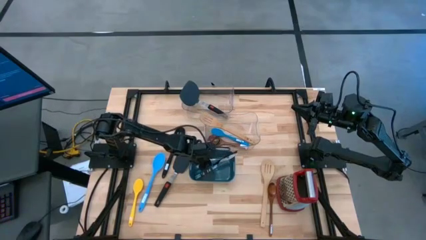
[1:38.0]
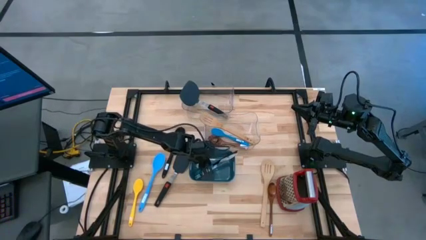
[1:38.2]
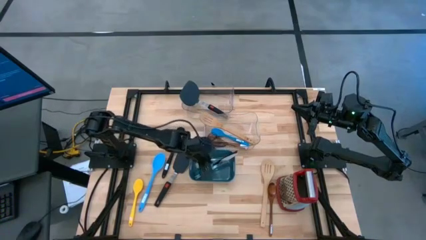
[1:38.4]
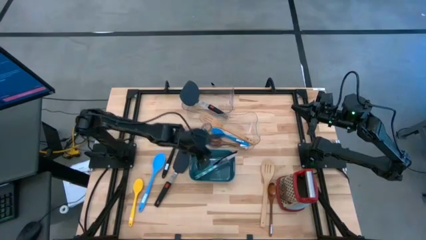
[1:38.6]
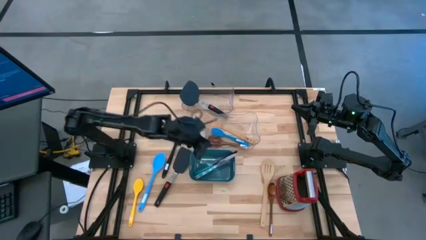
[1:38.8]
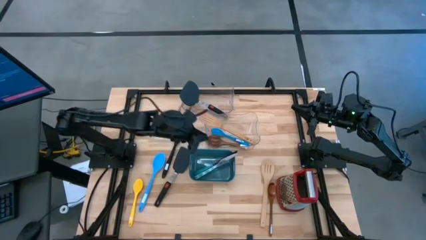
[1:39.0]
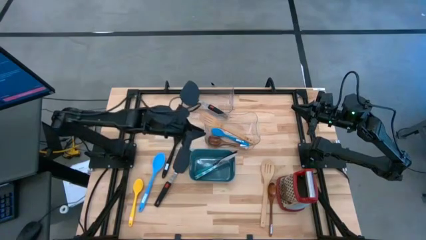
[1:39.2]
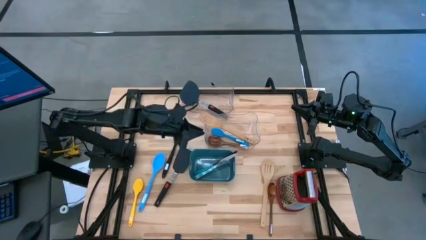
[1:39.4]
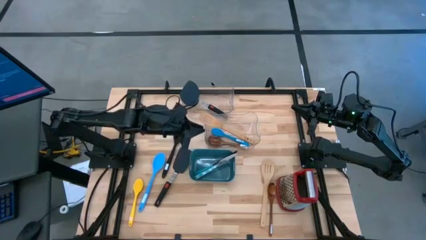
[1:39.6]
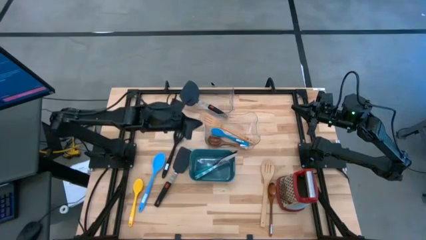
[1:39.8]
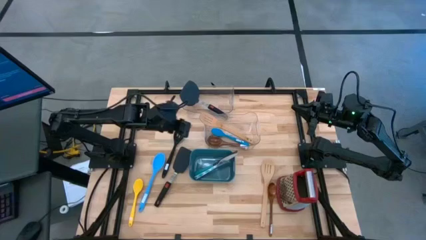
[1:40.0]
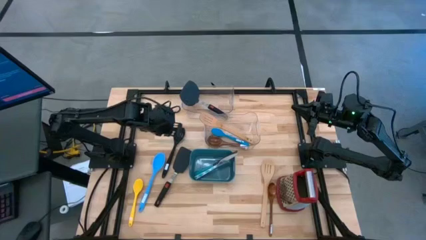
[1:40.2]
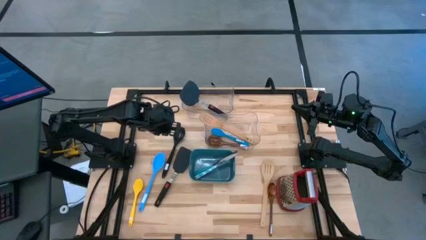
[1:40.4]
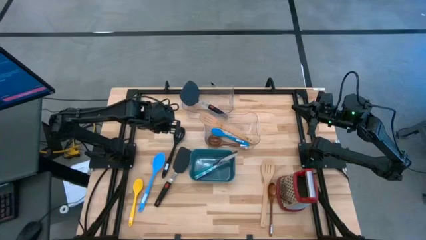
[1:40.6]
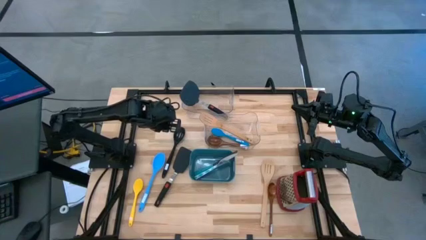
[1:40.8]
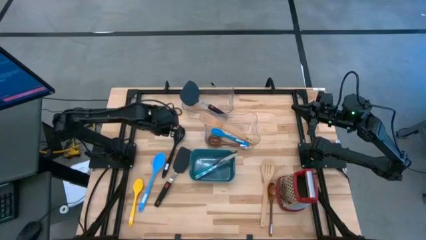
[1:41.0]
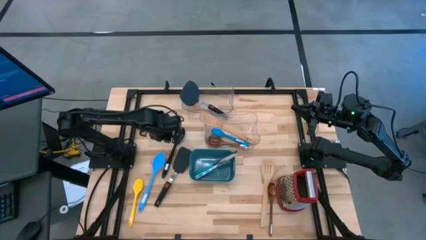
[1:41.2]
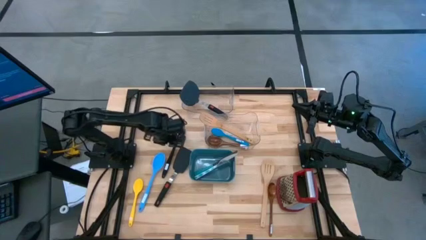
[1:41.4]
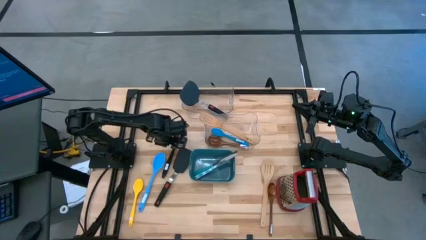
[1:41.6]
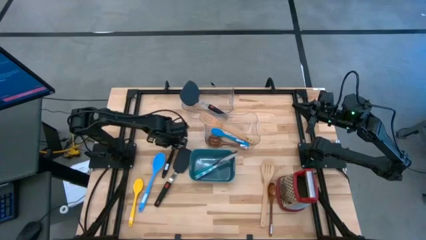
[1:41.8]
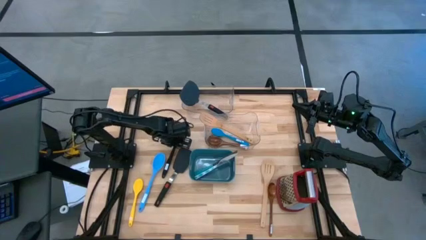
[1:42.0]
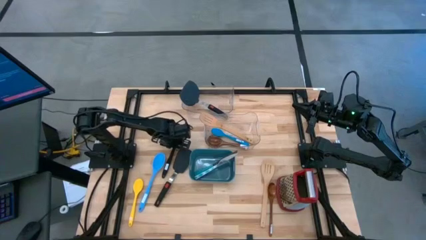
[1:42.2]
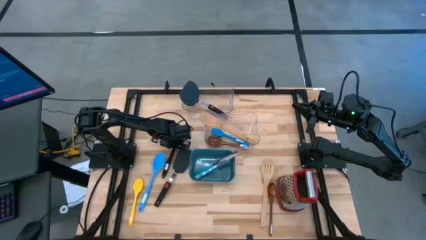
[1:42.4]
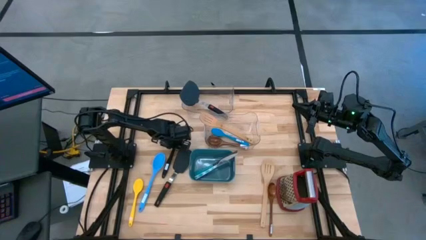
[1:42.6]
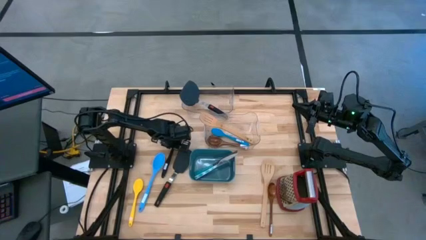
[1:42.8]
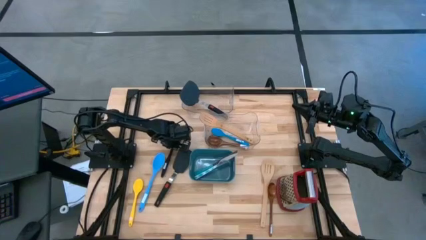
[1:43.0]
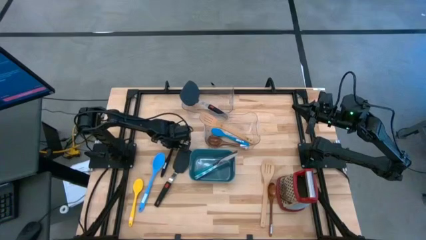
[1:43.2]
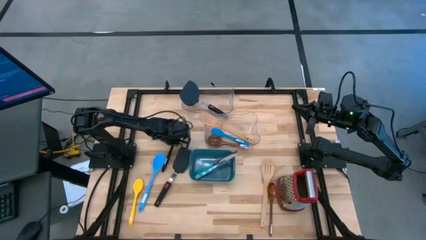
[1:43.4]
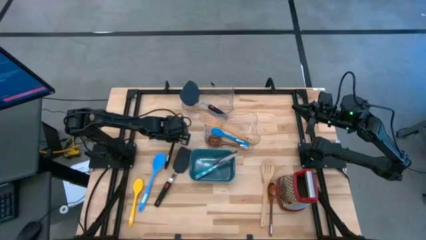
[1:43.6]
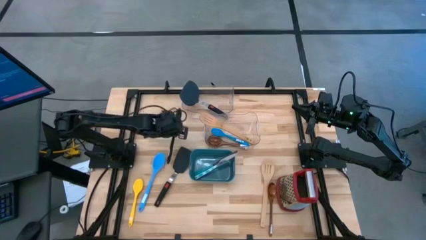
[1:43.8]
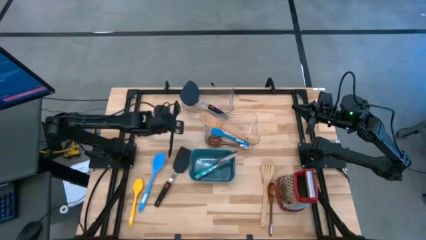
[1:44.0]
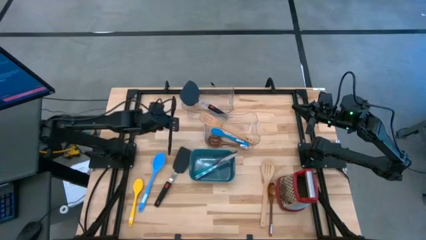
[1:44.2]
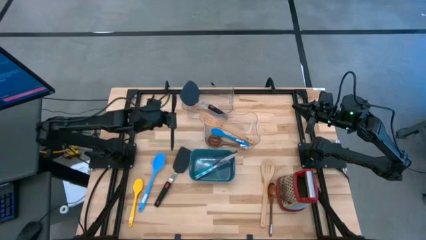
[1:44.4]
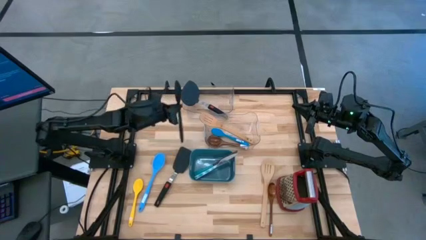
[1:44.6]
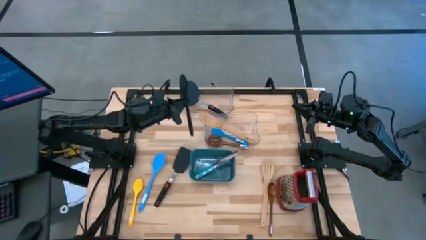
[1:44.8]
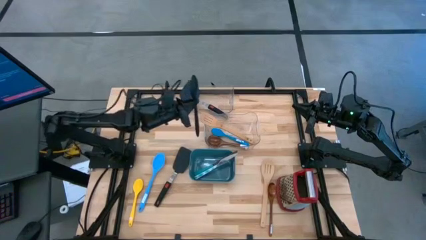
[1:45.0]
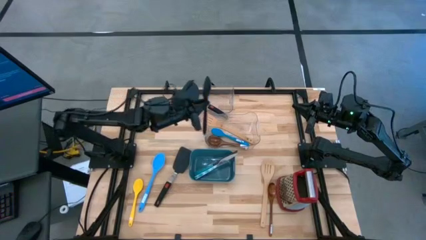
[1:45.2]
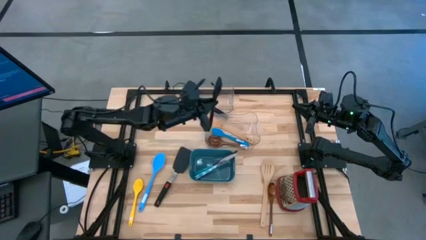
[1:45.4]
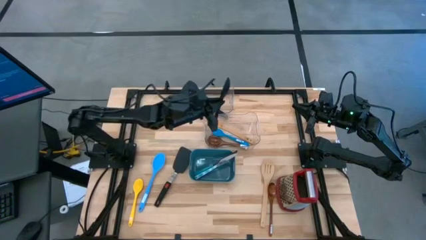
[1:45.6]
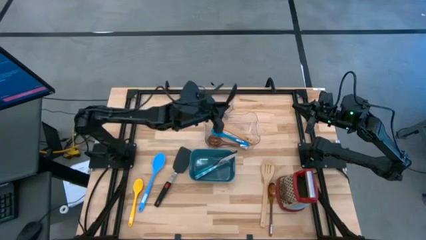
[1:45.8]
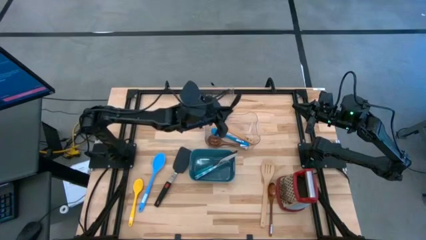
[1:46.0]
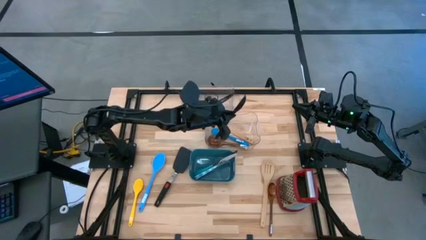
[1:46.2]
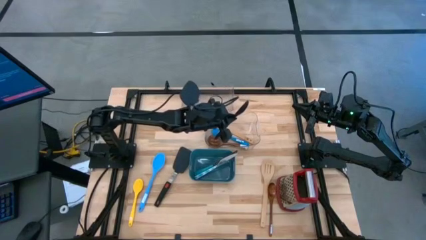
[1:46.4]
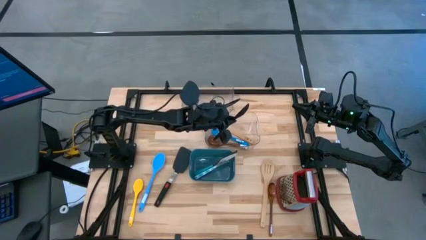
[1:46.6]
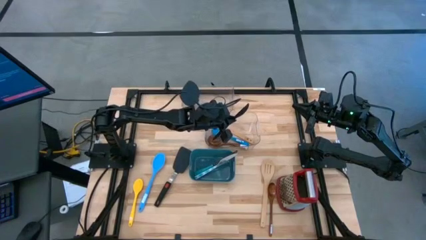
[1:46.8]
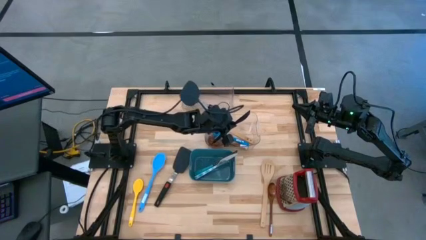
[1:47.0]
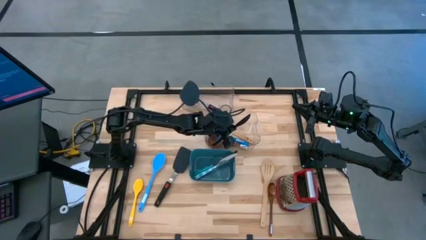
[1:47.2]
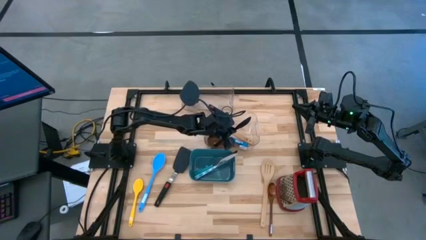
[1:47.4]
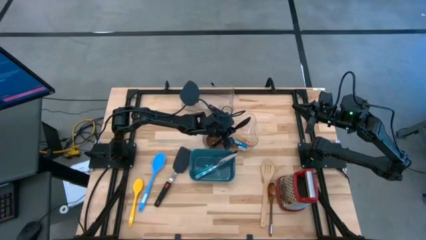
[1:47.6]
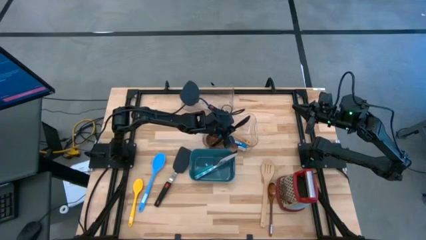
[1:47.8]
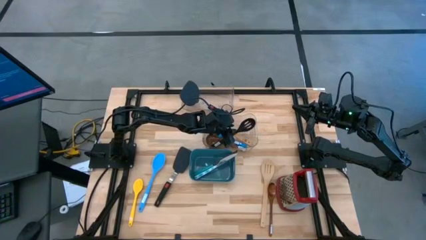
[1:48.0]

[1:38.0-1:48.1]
Task: Pick & Place Kitchen Items
Put the black slotted spatula into the bottom transparent bin
